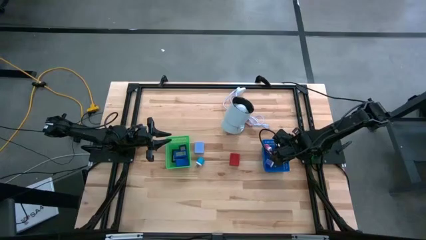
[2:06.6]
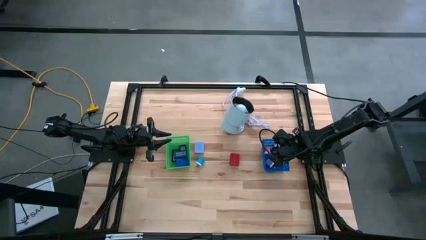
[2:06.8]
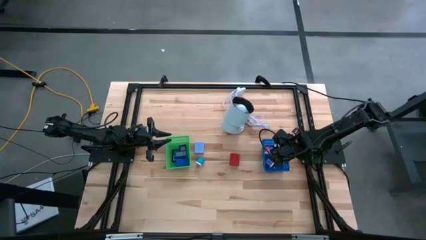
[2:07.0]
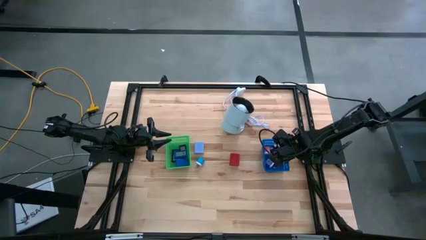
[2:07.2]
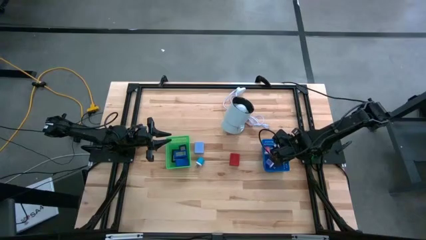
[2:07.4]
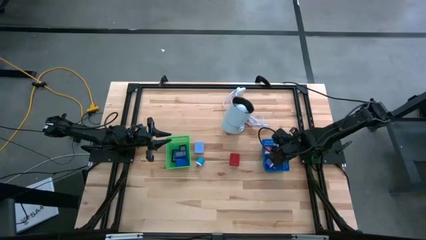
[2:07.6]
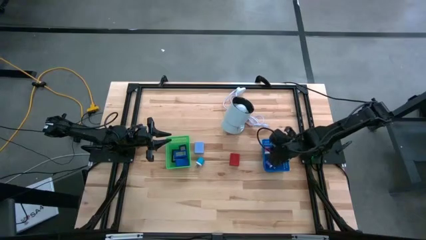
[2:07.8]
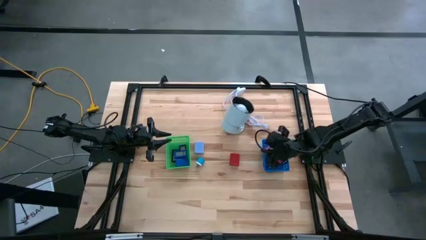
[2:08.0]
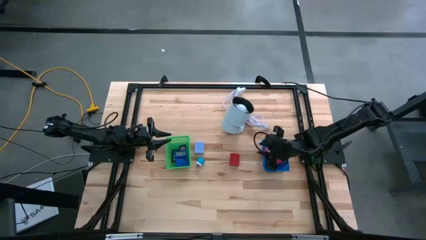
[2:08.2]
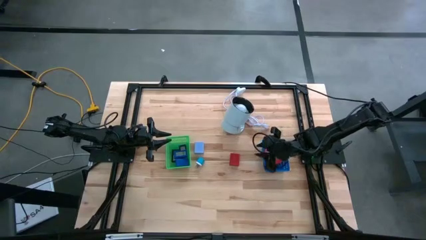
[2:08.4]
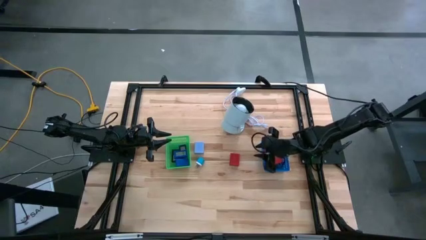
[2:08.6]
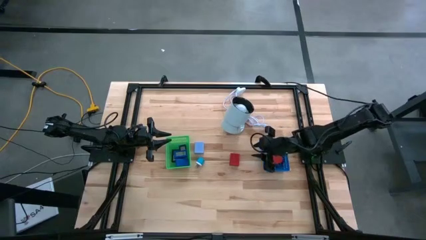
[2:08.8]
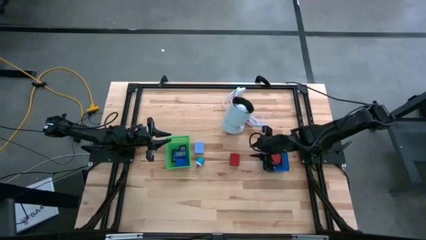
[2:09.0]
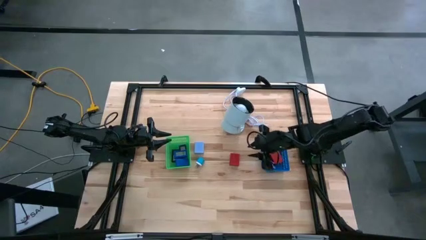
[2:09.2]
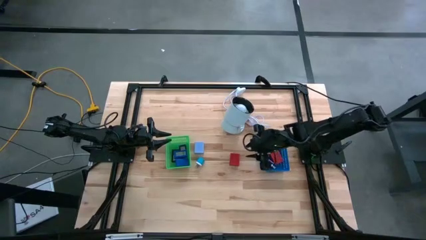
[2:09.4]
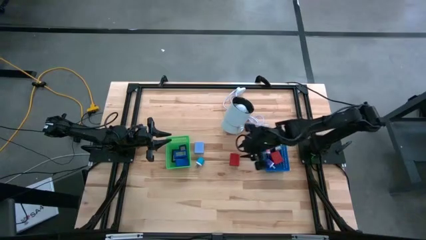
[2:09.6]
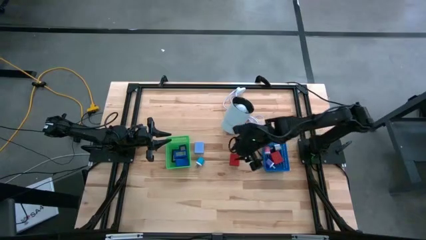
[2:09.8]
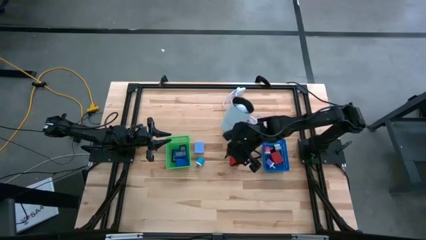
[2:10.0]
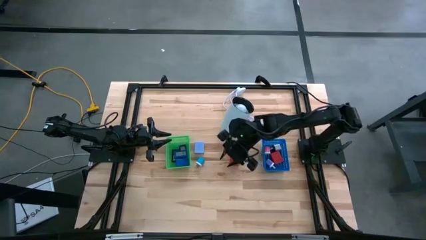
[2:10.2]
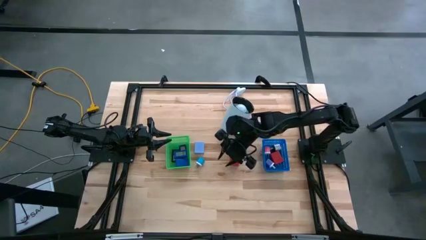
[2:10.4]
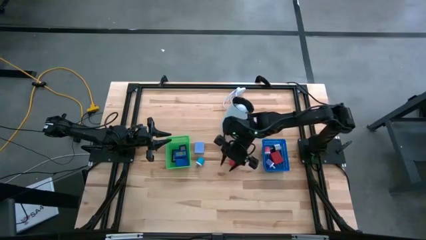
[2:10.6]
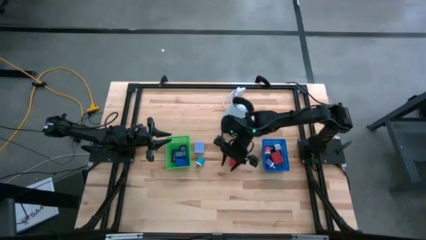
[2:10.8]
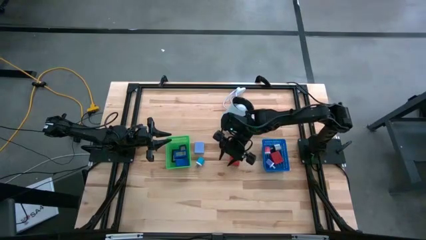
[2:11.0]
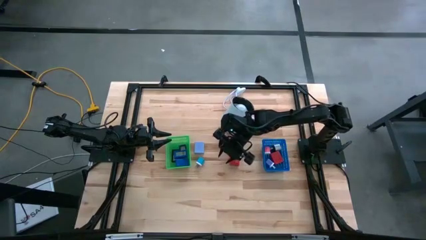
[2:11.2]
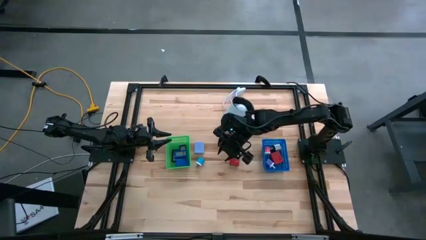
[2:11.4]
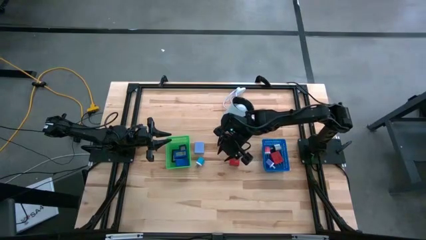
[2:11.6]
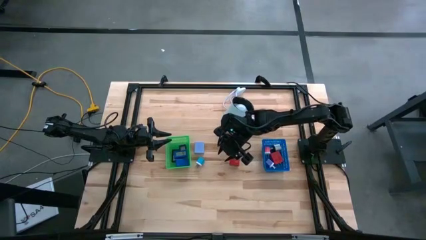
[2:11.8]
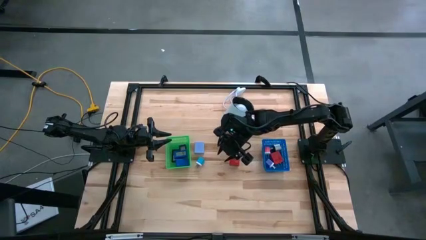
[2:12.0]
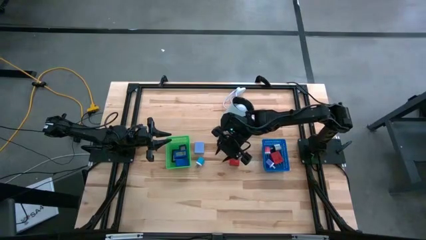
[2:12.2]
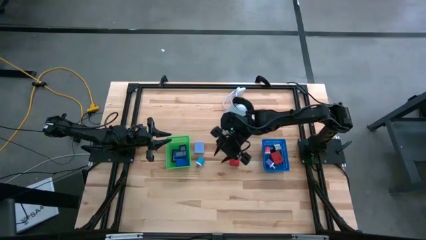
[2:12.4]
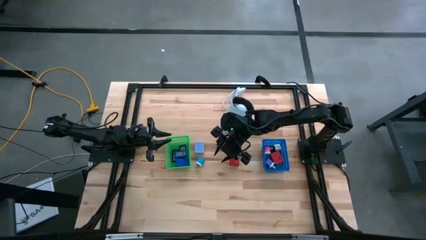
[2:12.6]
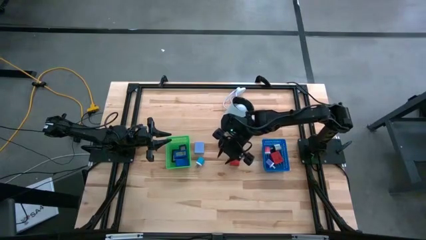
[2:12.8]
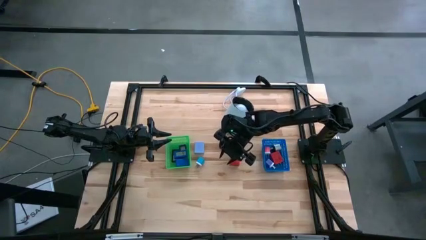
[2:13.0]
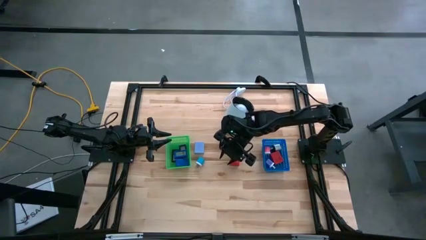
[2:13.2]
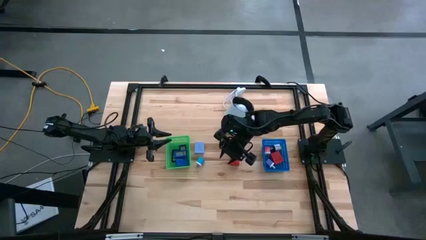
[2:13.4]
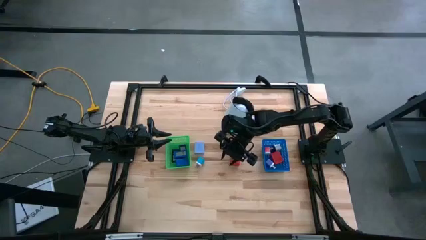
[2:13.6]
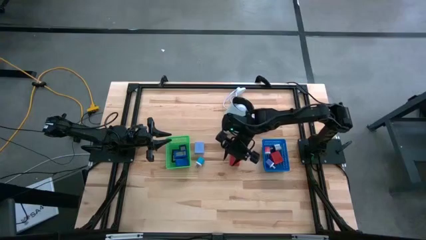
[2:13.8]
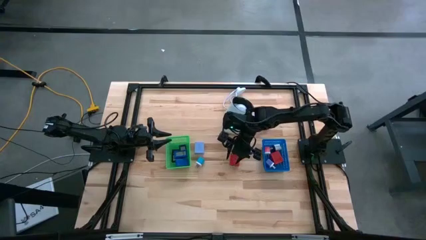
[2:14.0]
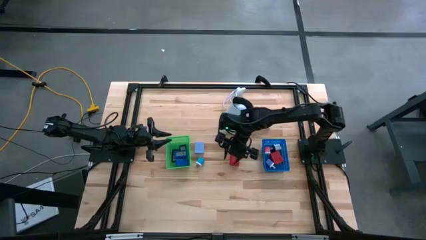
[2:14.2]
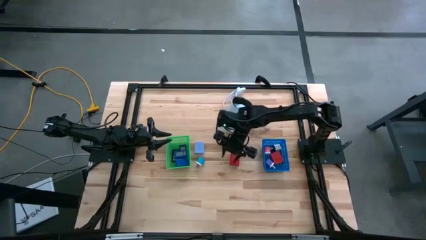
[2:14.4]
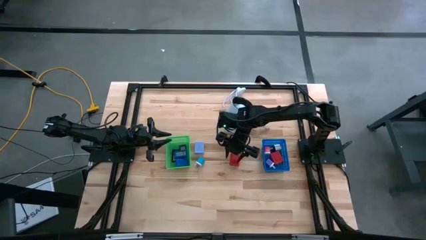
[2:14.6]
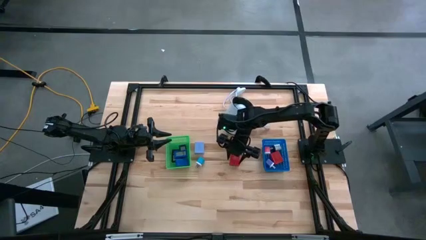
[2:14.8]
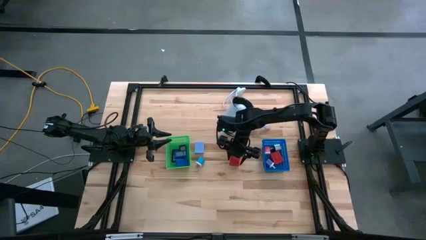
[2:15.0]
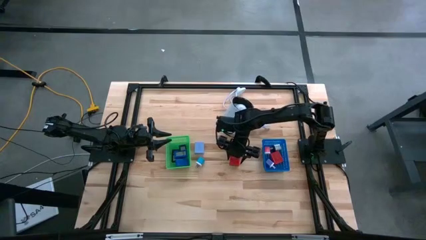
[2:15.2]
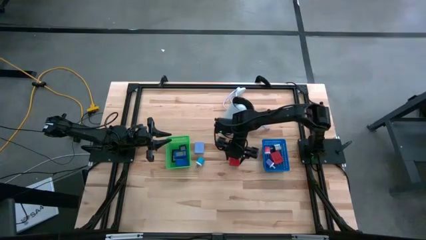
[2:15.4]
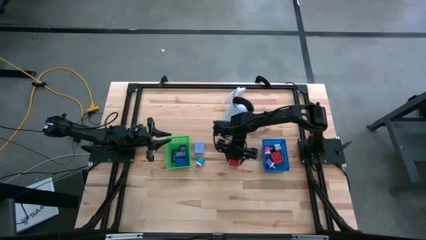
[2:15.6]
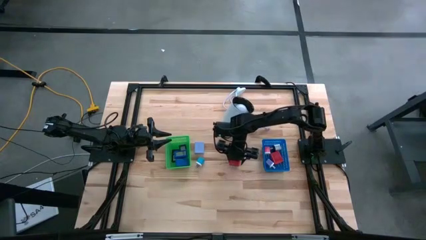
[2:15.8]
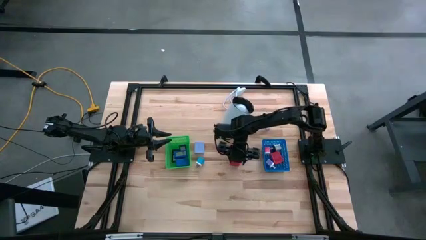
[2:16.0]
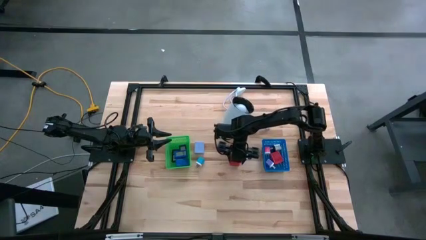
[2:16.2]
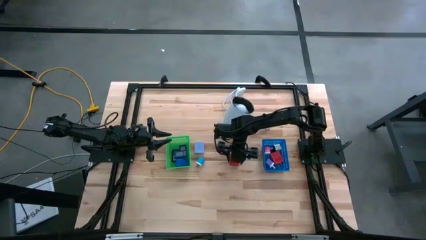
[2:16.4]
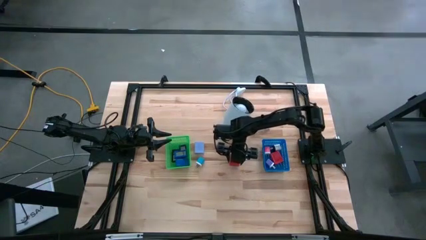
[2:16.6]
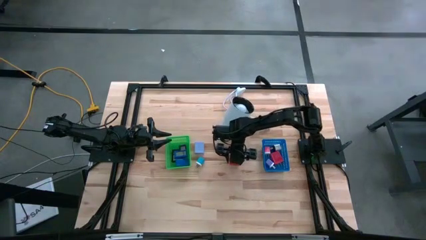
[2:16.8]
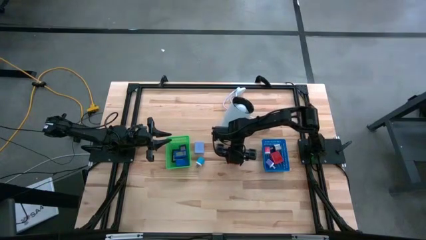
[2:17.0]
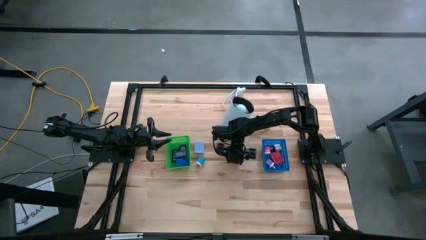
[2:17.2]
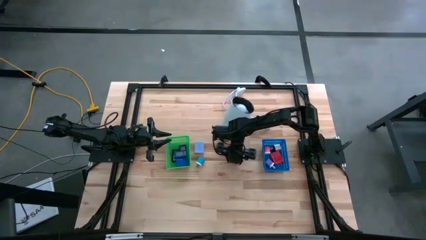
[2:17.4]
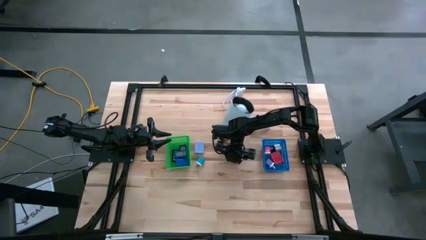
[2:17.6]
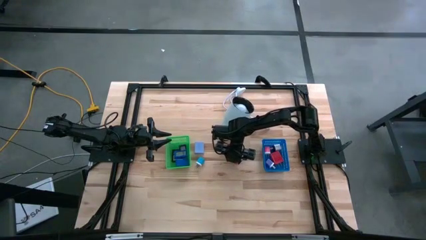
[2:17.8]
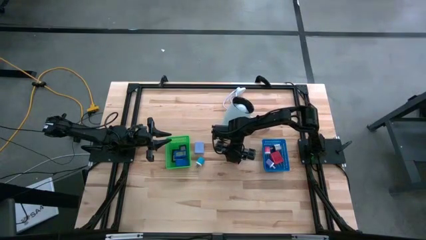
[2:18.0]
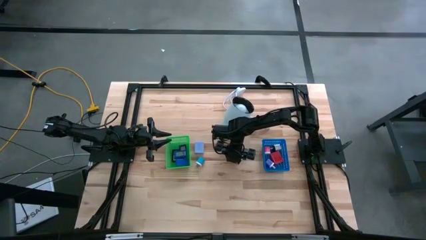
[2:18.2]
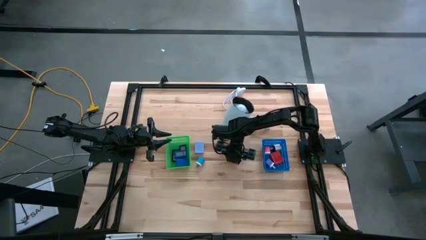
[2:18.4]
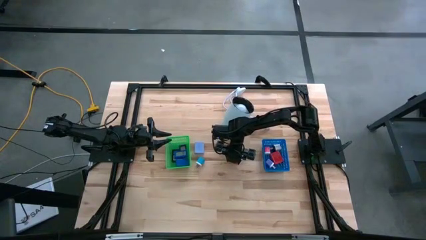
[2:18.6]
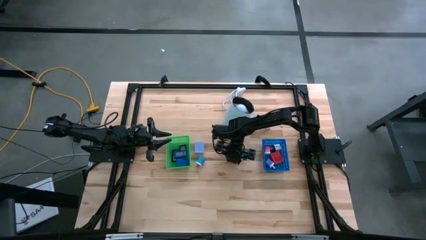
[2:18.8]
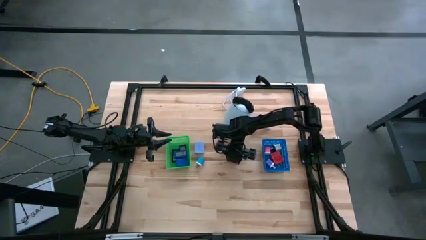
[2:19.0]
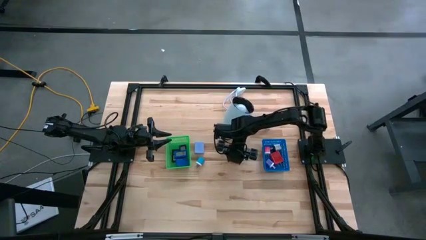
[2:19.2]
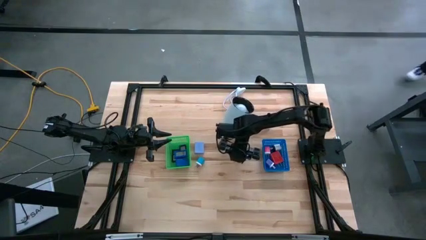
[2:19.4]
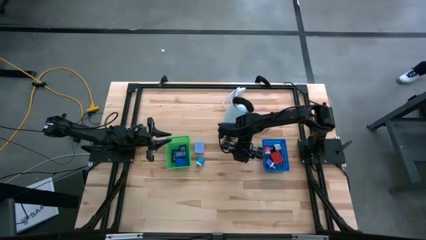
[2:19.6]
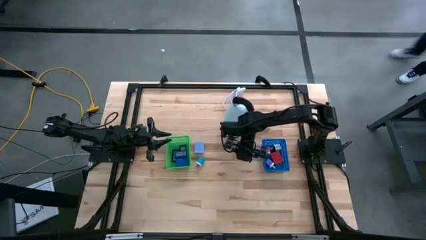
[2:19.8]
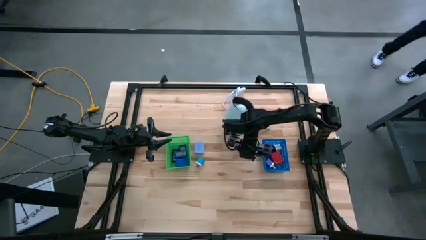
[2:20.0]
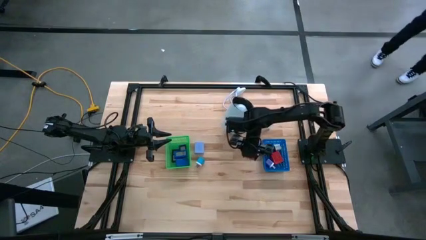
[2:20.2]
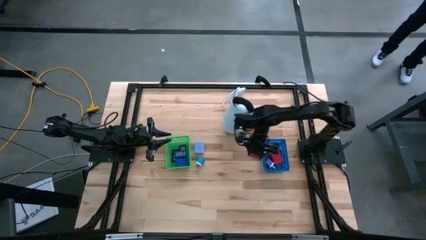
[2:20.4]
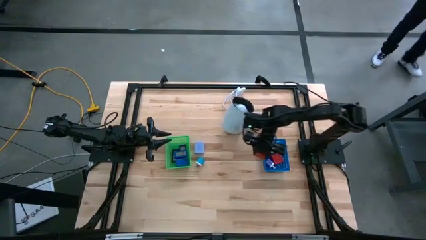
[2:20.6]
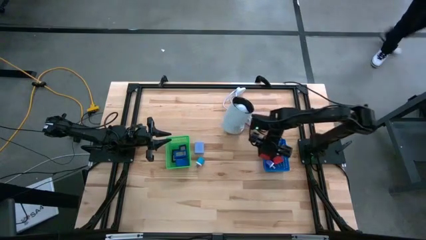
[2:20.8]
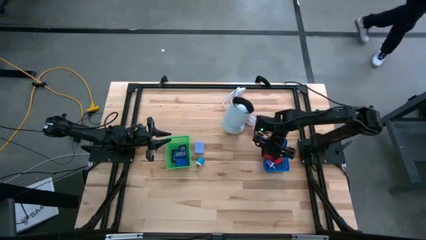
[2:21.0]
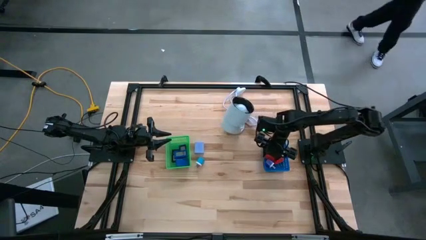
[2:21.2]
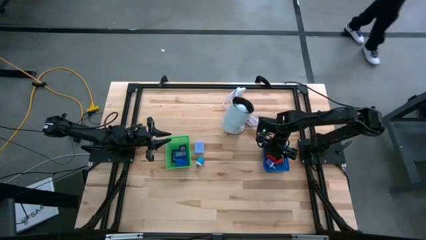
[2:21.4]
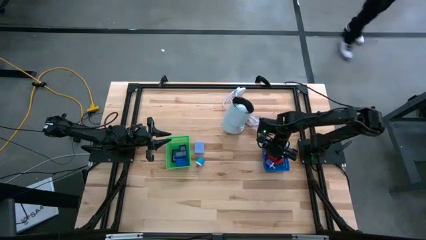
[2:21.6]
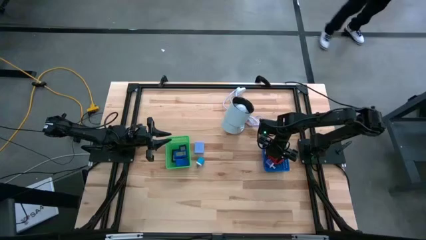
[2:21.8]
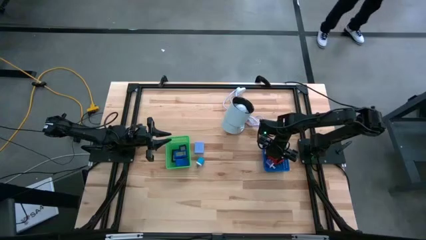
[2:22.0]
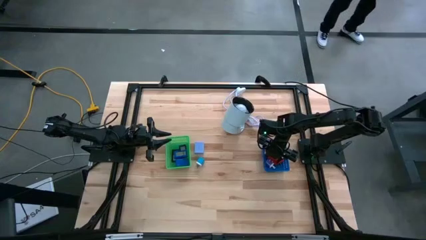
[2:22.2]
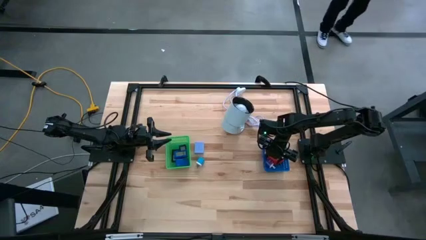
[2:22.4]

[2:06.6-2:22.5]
Task: Pick & Place Office items
Put the red charger adapter into the blue bin
